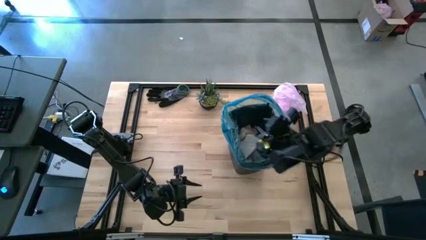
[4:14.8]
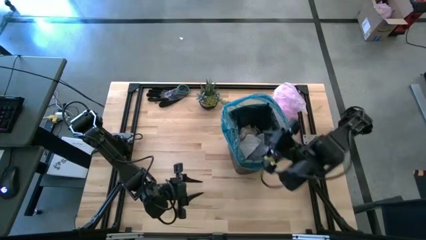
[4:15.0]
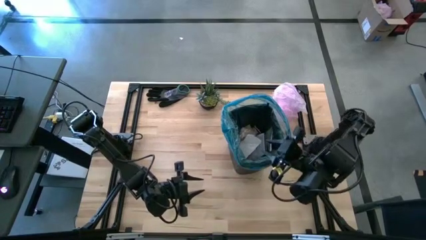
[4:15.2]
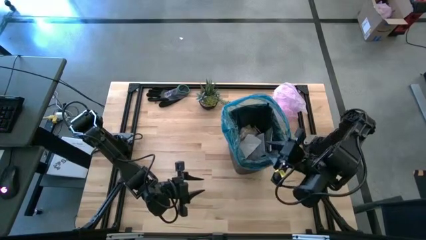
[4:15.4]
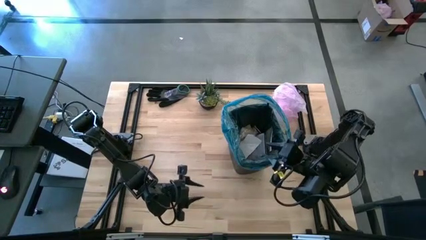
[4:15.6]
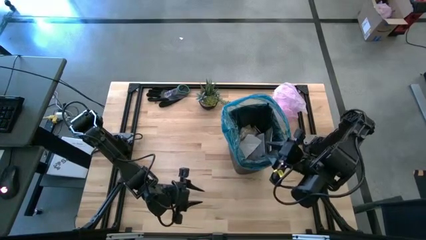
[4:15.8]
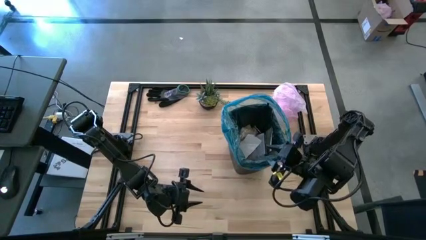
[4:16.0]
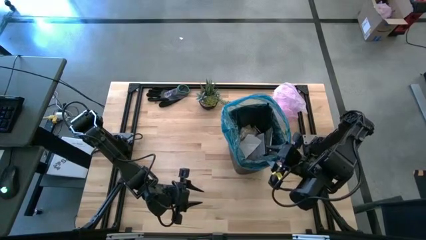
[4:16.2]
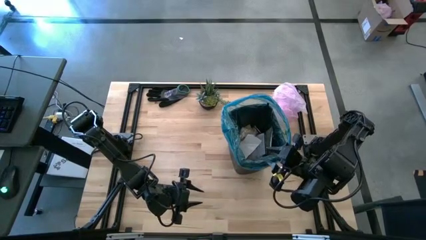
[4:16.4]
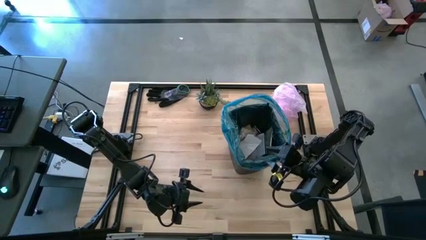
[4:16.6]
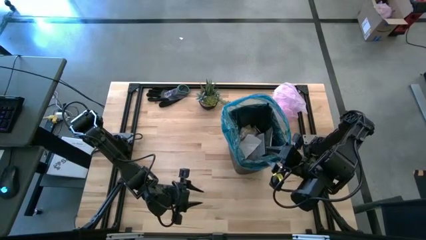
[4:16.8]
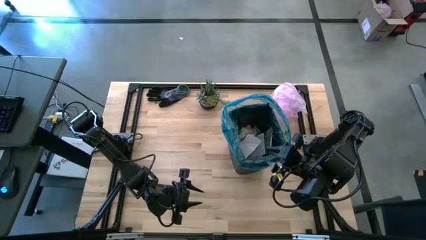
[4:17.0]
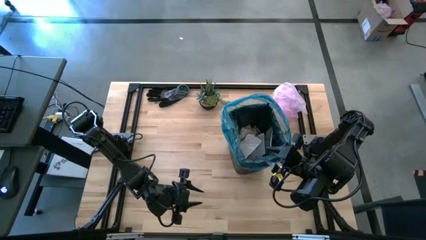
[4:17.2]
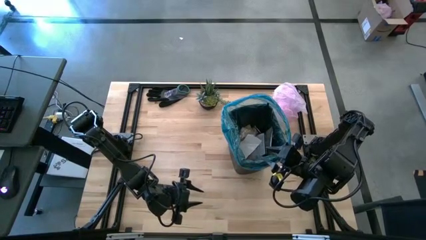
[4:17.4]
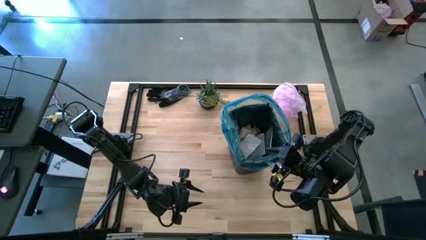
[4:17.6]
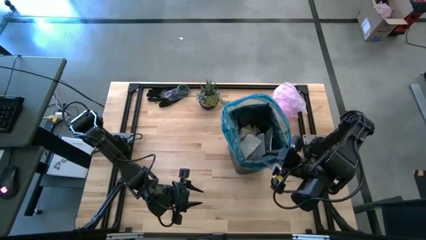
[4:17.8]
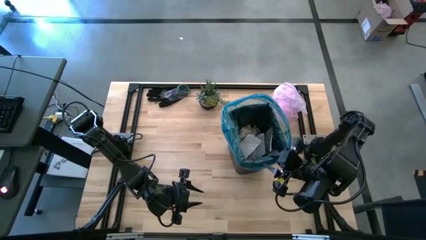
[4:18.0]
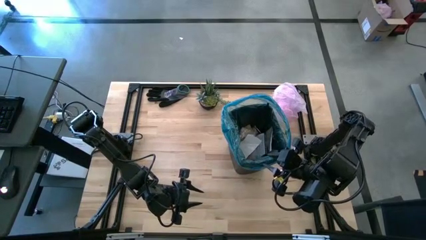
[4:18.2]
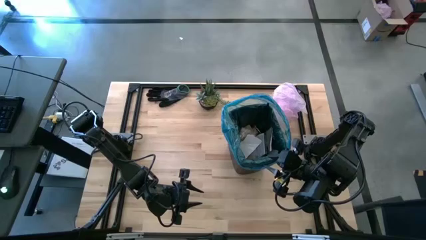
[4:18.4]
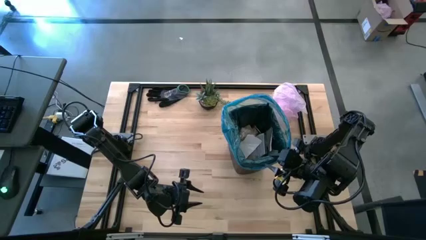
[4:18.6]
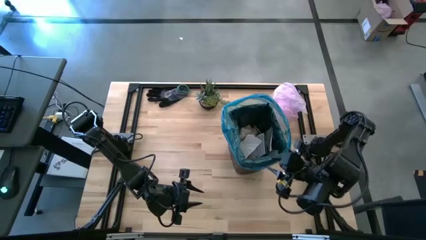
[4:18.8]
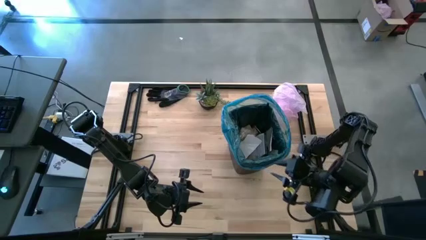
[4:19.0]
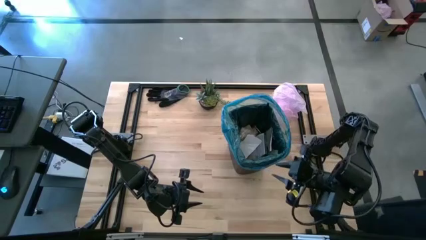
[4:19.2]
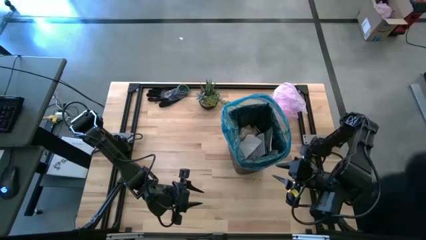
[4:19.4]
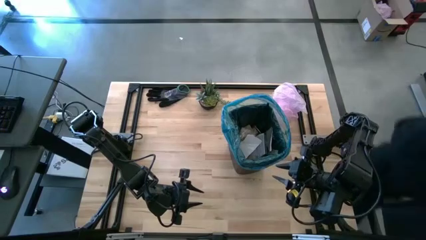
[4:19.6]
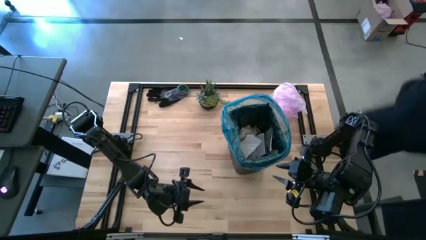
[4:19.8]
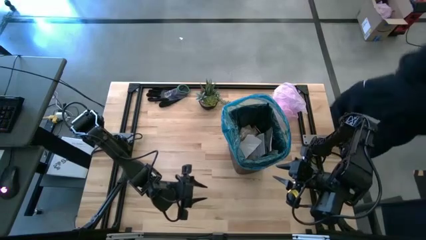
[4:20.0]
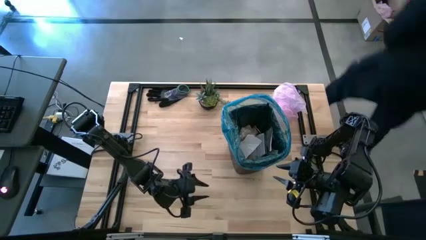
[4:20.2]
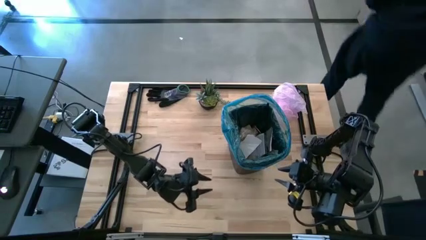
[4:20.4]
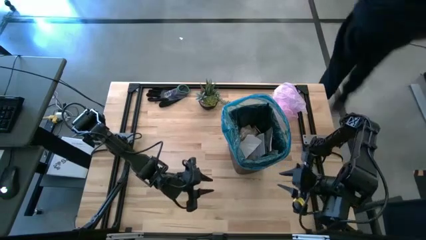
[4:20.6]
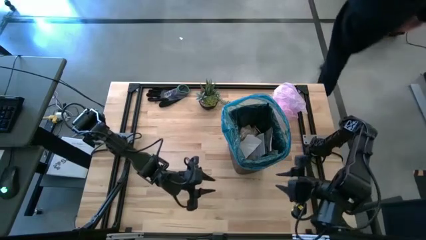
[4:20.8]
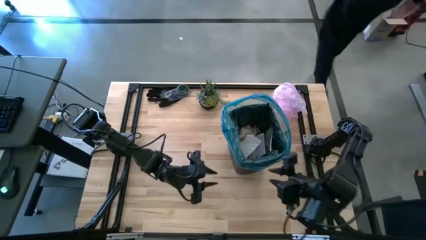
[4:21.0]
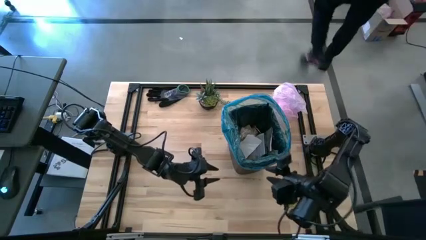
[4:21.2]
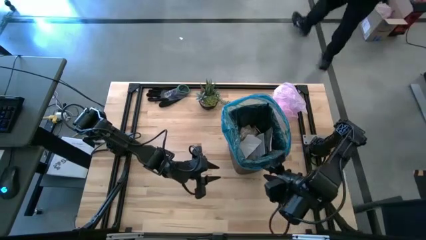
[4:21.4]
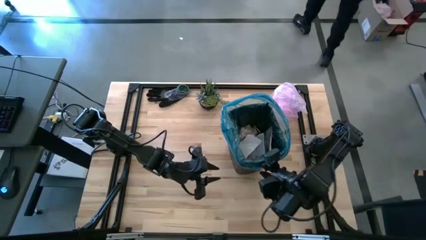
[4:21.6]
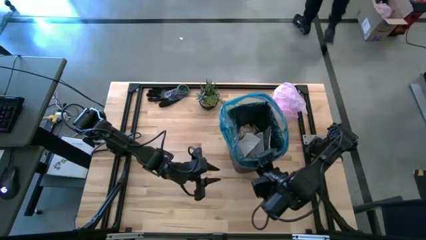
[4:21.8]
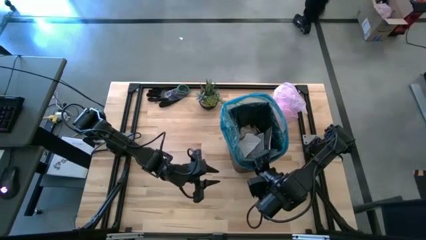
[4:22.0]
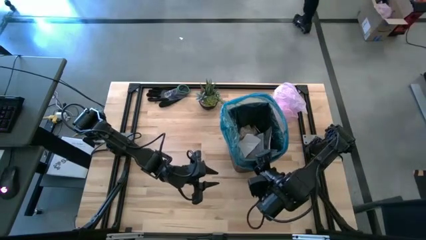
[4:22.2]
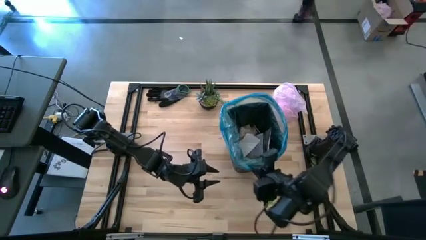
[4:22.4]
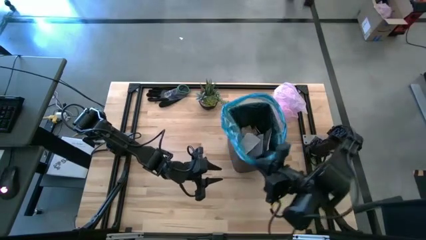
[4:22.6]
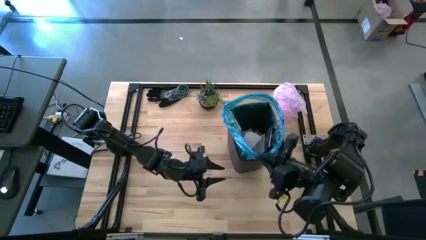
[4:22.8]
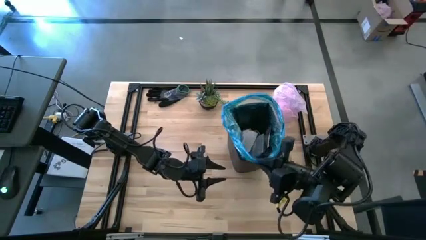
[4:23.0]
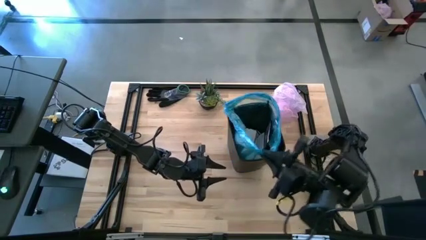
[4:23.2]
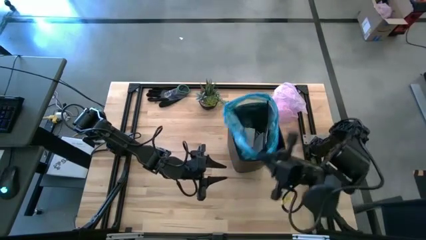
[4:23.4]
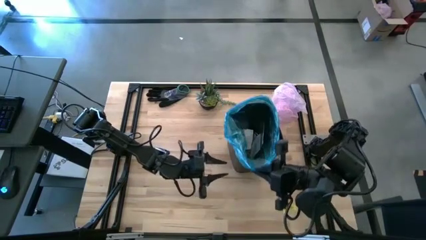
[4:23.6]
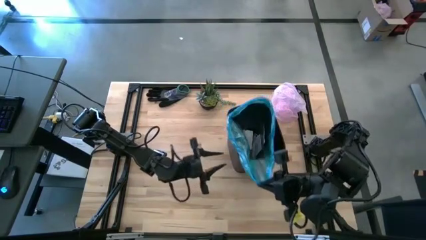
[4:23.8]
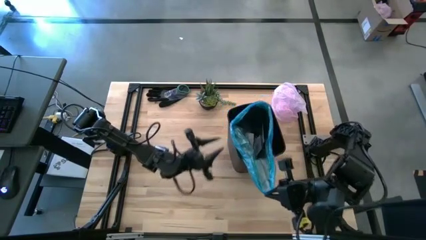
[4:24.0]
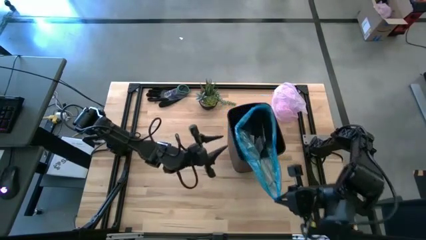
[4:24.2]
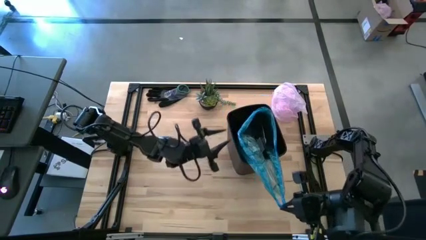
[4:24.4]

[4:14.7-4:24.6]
Task: place trash/remove bag and relplace
Remove the blue trash bag from the trash bin

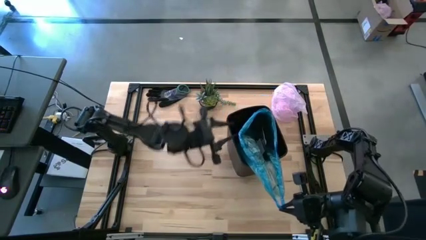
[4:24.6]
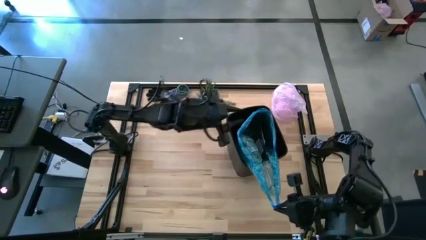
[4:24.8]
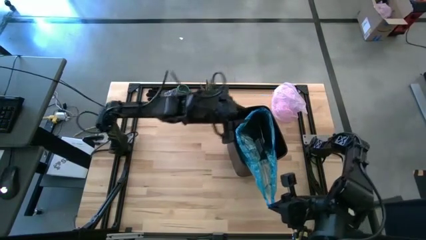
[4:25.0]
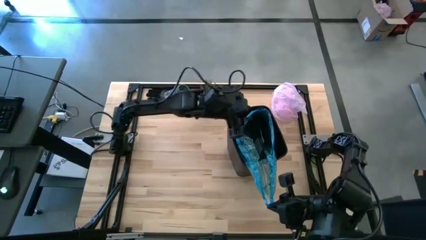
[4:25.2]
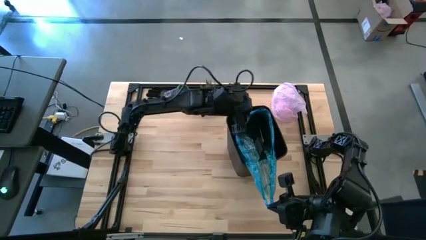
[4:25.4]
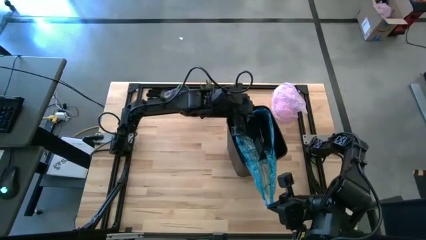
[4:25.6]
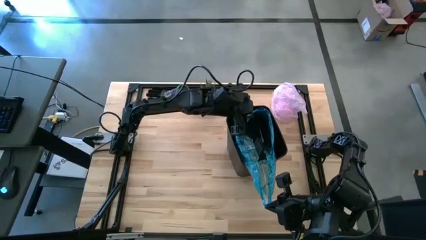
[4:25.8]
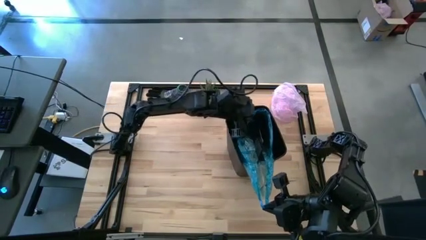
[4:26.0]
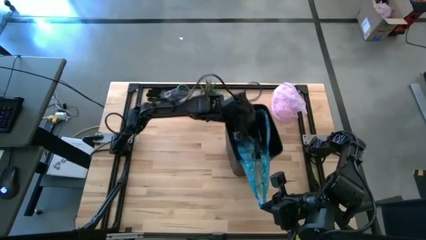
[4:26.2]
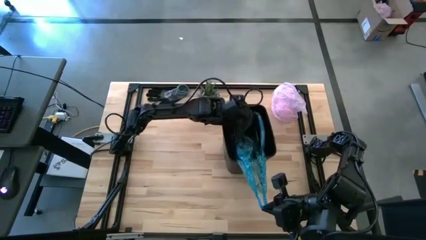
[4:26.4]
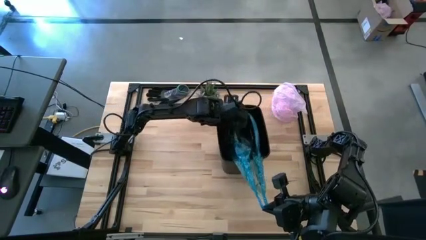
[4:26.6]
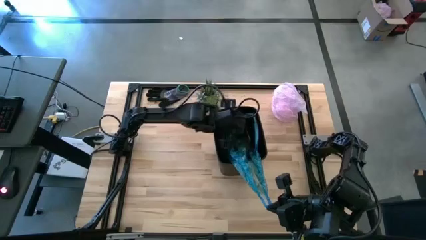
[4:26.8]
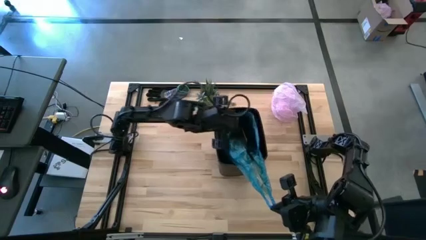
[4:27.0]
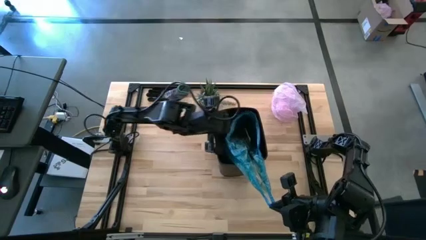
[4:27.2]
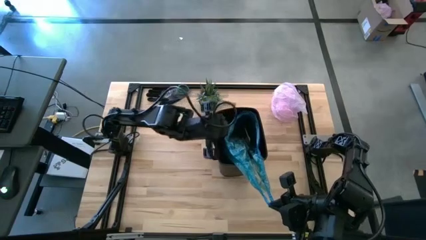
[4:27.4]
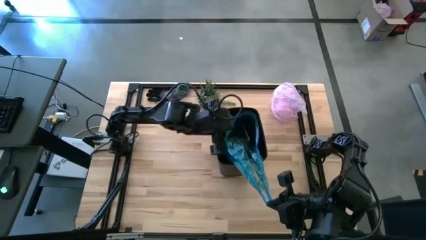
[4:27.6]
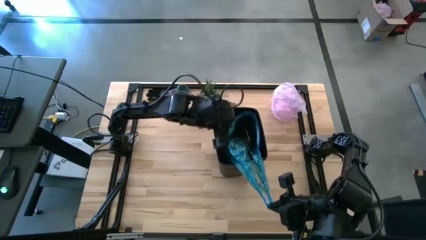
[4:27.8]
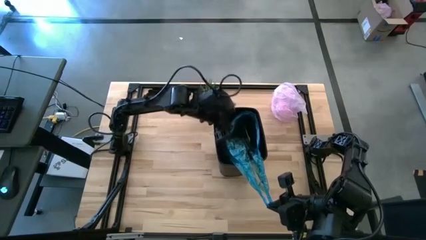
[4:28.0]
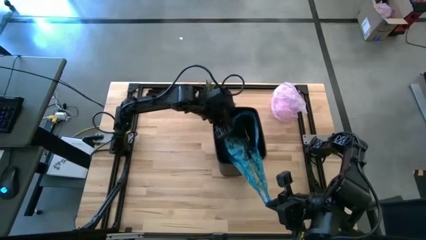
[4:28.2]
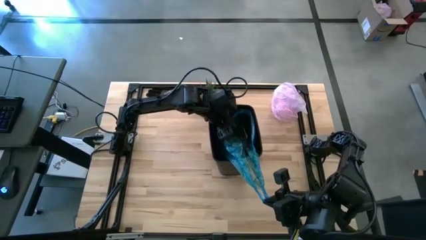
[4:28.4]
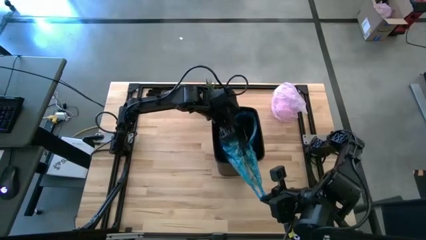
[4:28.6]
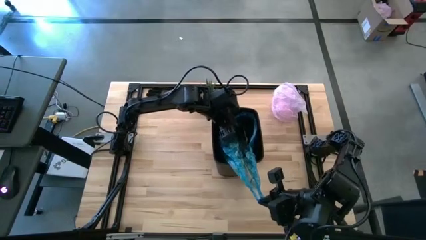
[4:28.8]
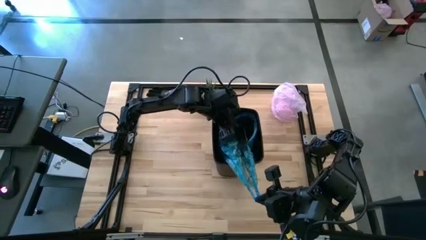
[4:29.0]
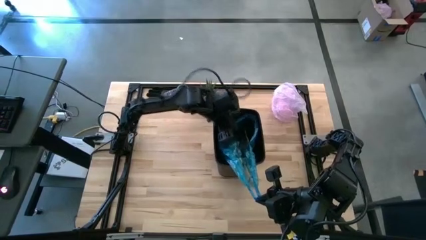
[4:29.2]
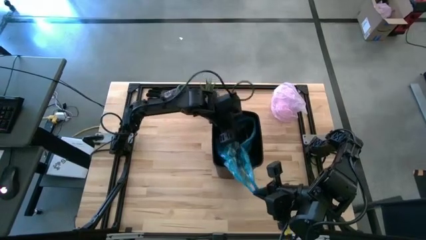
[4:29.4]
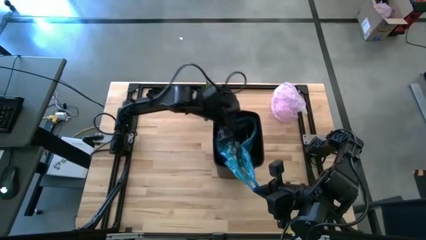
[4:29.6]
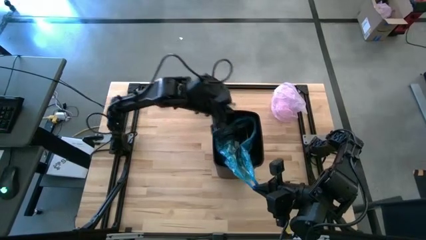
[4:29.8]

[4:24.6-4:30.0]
Remove the blue trash bag from the trash bin
